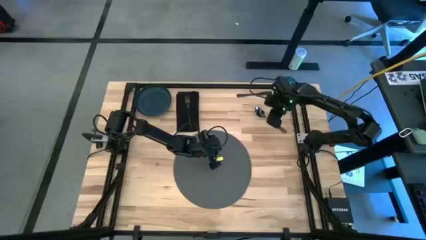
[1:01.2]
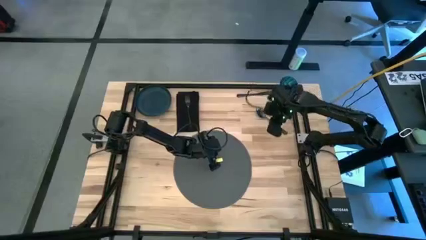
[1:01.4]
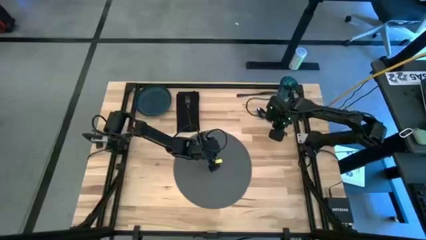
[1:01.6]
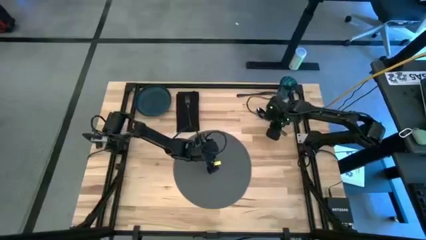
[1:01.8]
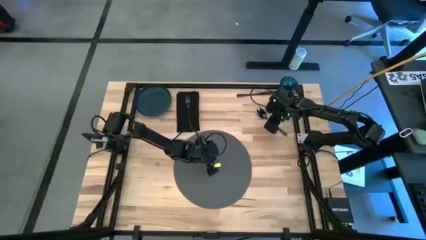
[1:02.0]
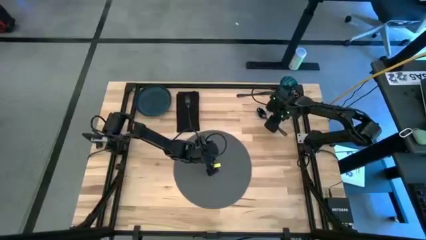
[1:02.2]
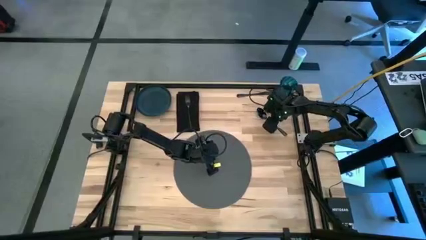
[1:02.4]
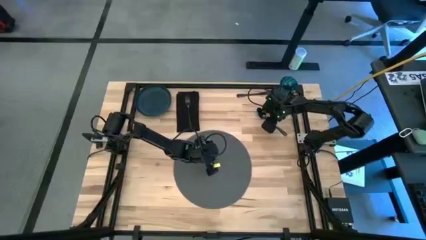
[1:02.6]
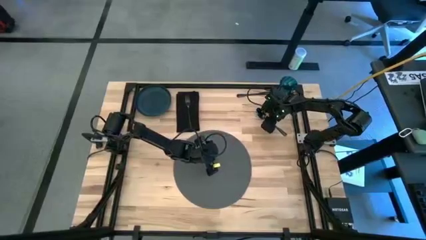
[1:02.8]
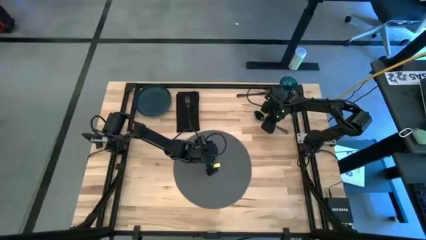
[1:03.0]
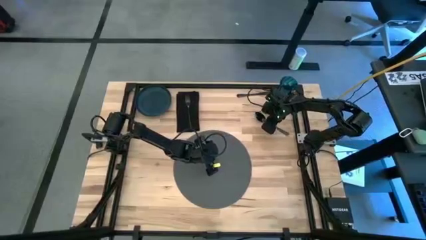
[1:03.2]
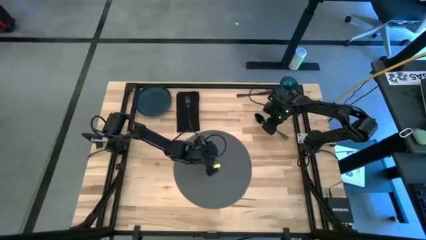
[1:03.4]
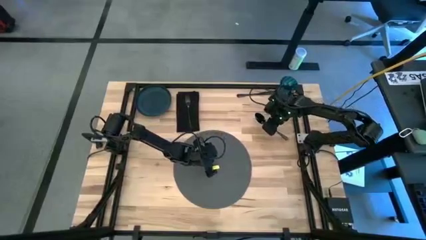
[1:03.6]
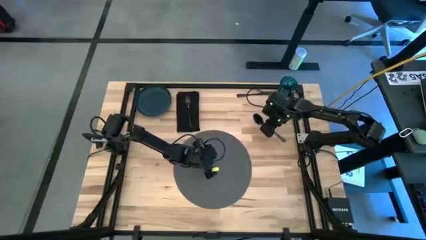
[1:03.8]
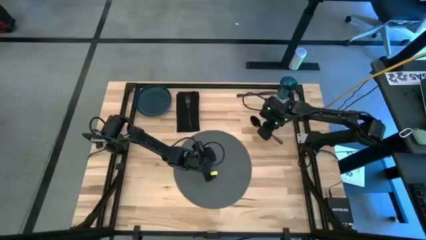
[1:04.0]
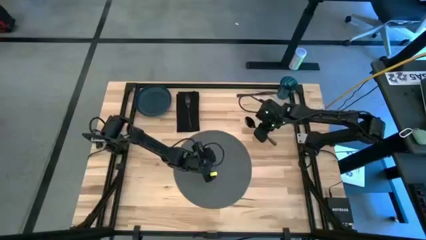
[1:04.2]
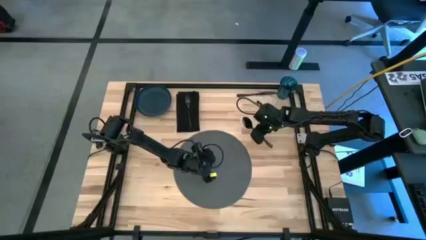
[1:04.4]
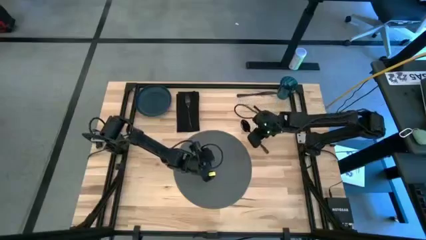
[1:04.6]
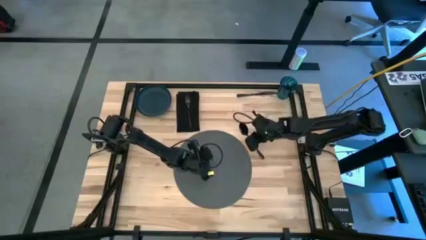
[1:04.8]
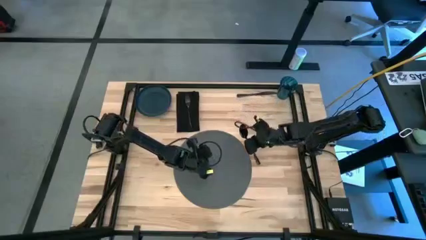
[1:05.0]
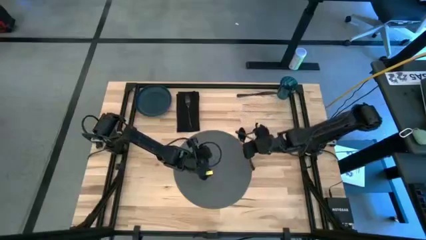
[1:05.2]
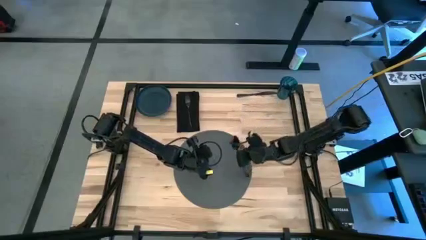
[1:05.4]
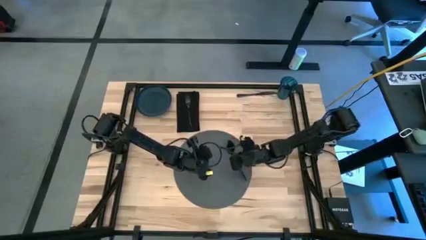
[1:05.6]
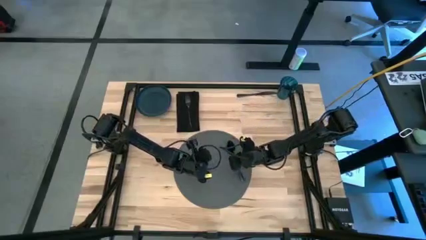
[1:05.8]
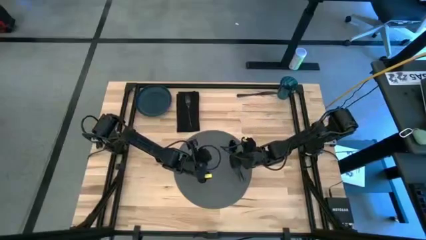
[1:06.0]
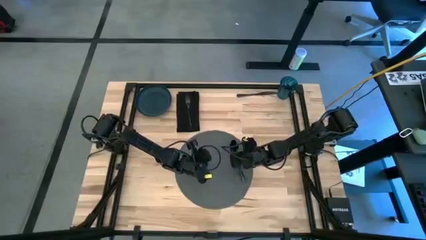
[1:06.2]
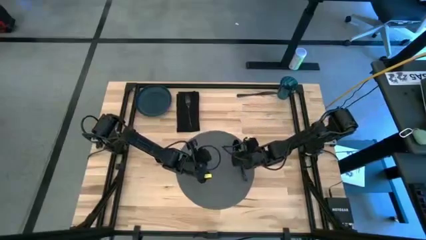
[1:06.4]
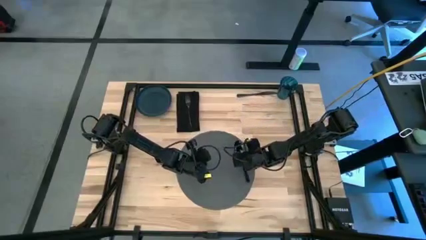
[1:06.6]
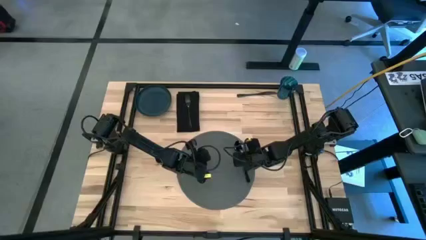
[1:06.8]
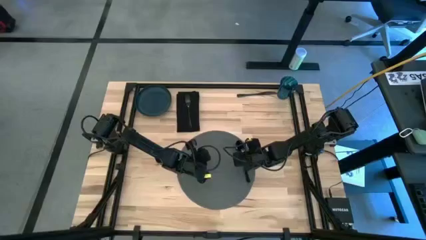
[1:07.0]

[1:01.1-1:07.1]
Task: Set table place
Put the black spoon on the gray tablemat

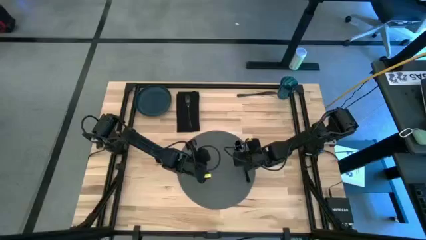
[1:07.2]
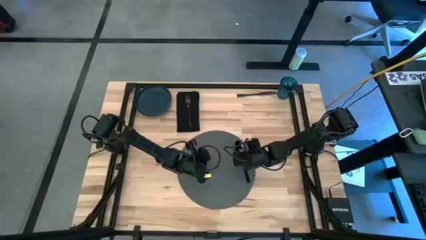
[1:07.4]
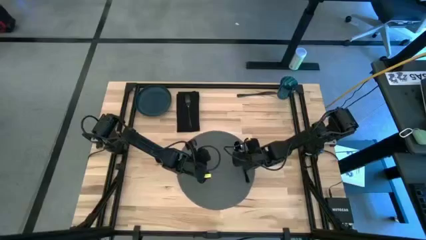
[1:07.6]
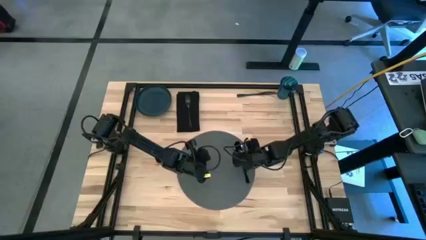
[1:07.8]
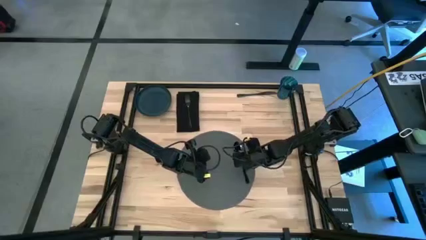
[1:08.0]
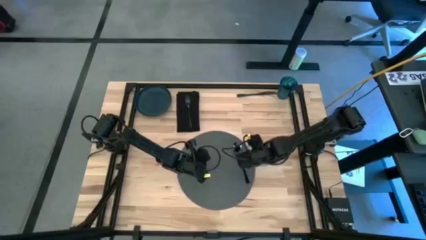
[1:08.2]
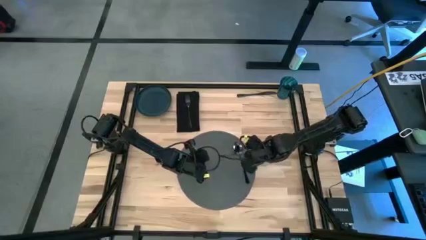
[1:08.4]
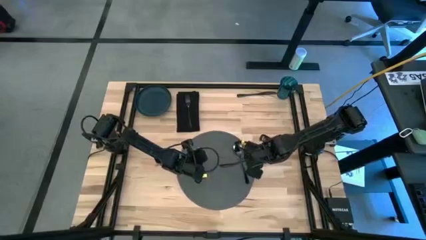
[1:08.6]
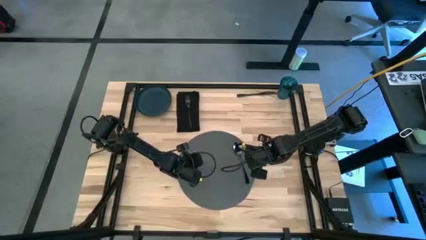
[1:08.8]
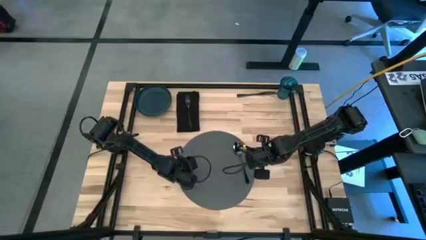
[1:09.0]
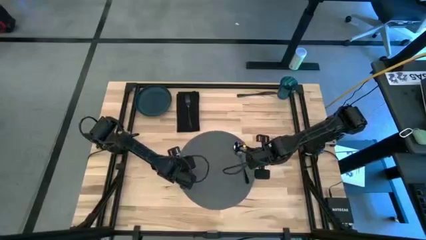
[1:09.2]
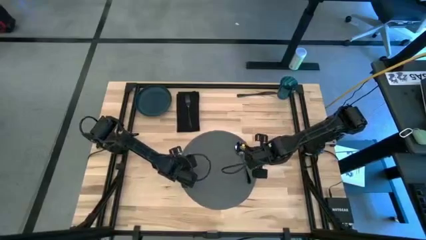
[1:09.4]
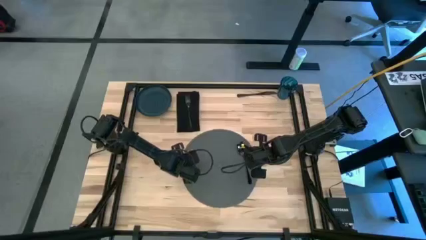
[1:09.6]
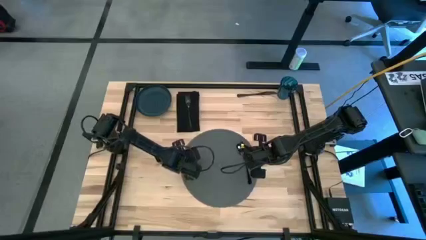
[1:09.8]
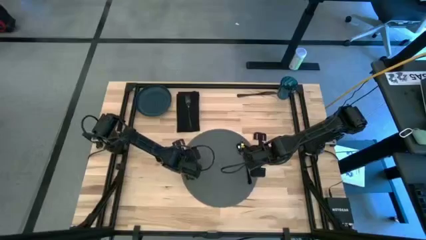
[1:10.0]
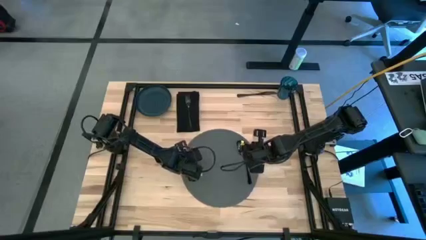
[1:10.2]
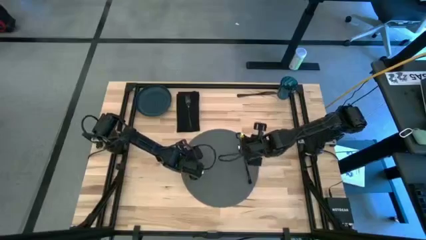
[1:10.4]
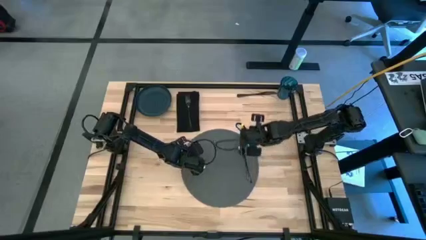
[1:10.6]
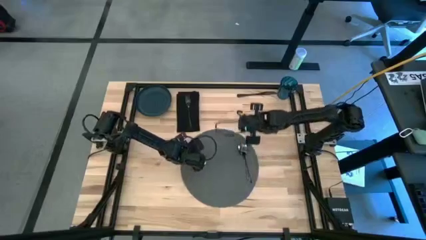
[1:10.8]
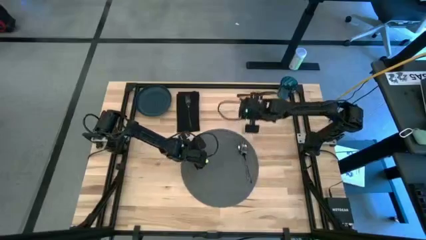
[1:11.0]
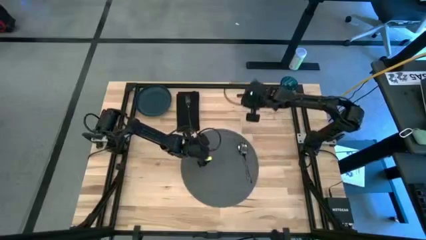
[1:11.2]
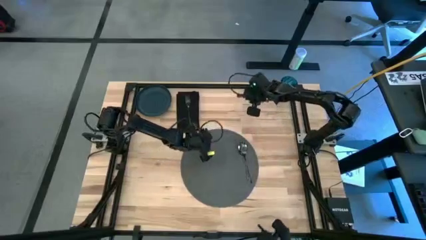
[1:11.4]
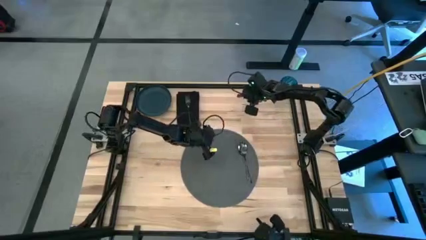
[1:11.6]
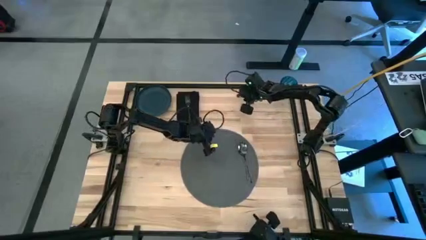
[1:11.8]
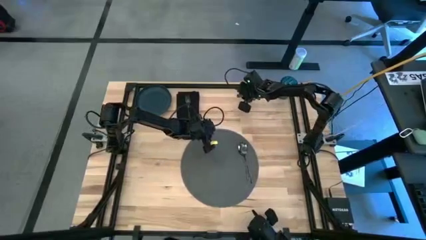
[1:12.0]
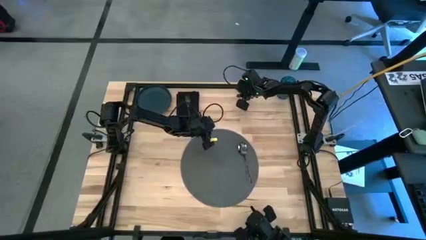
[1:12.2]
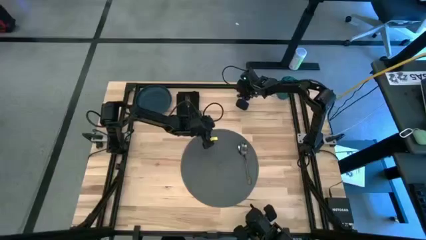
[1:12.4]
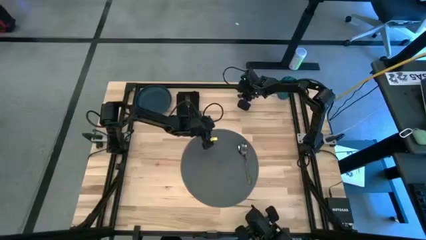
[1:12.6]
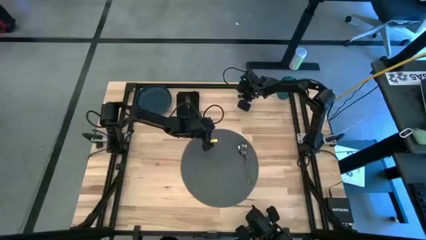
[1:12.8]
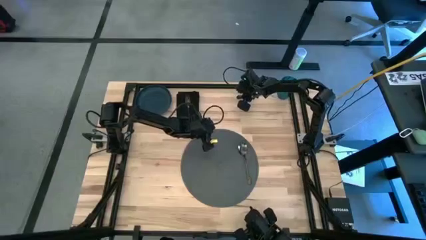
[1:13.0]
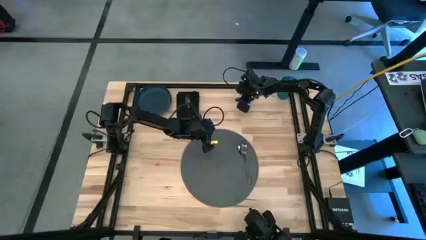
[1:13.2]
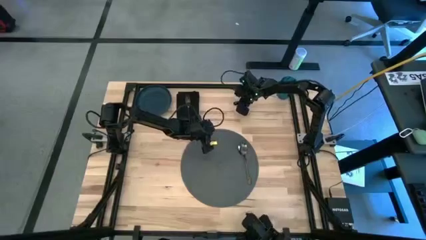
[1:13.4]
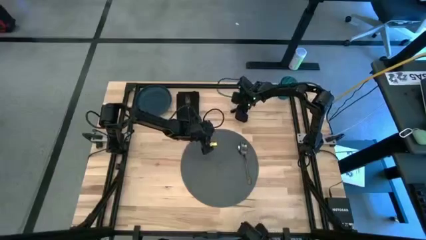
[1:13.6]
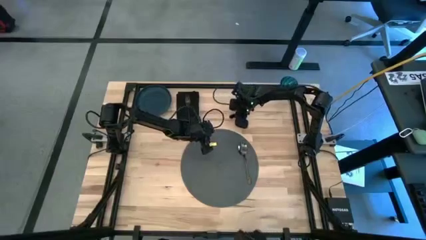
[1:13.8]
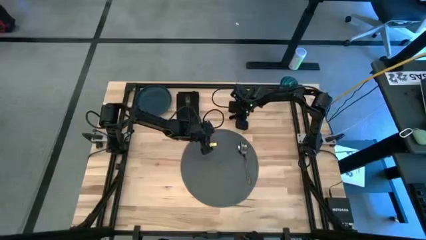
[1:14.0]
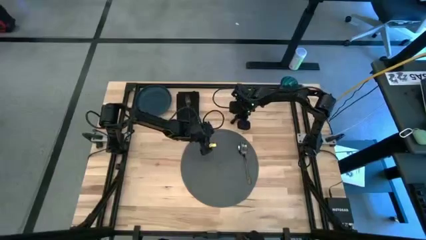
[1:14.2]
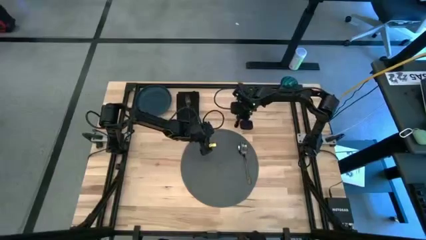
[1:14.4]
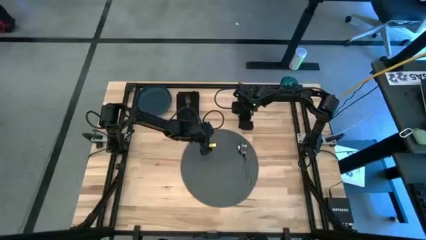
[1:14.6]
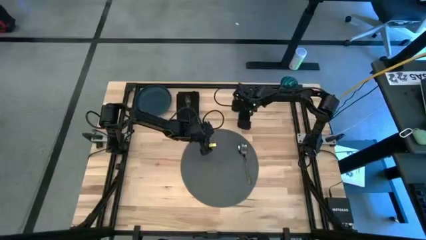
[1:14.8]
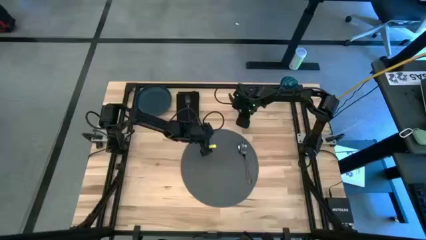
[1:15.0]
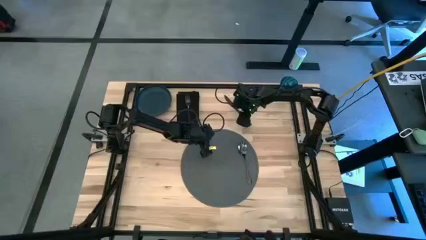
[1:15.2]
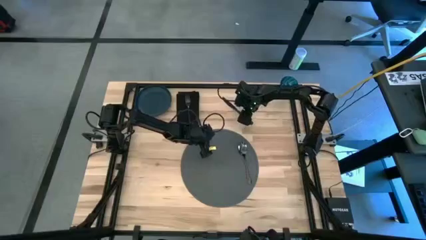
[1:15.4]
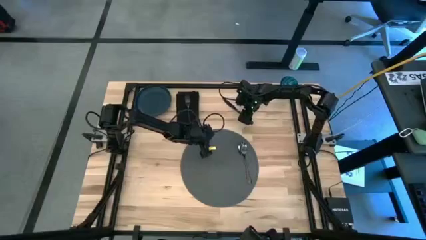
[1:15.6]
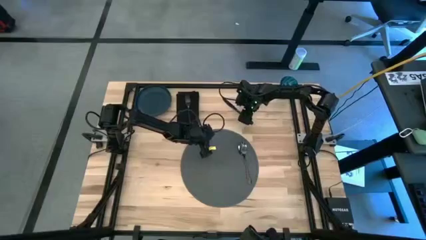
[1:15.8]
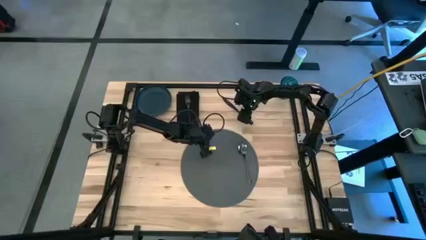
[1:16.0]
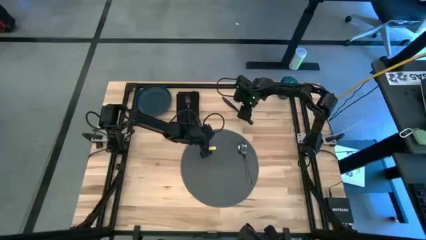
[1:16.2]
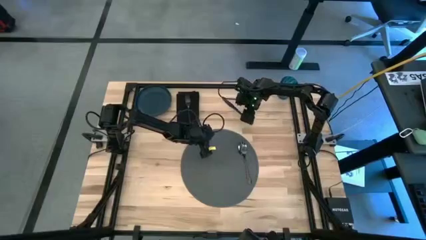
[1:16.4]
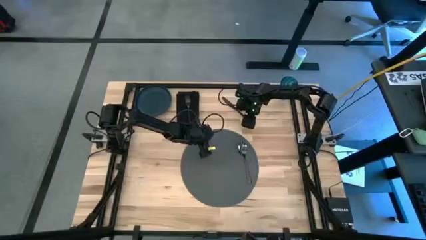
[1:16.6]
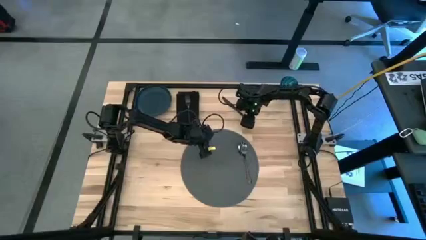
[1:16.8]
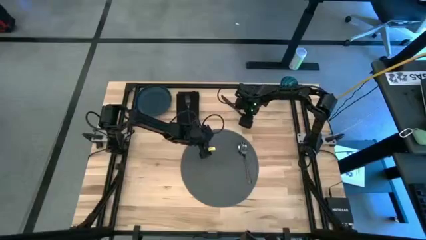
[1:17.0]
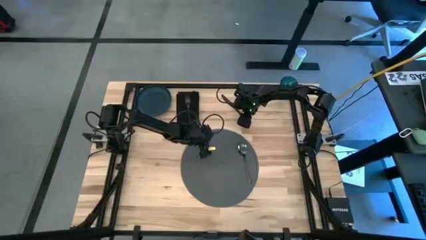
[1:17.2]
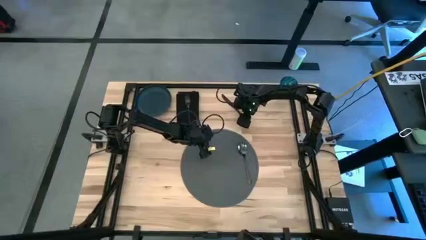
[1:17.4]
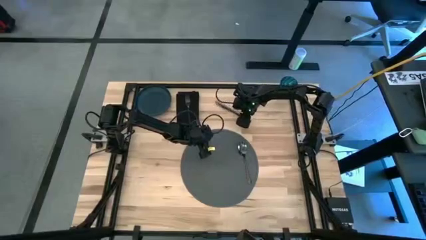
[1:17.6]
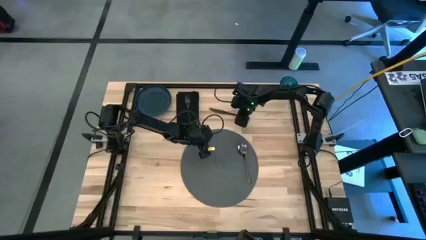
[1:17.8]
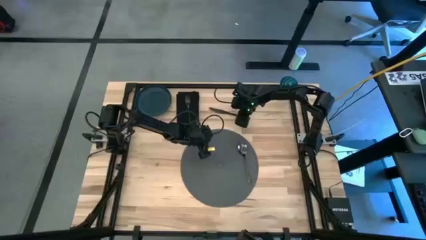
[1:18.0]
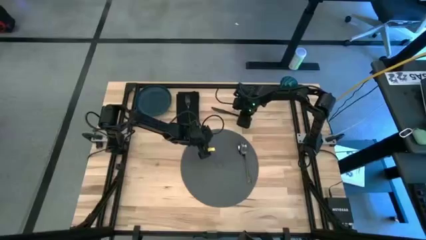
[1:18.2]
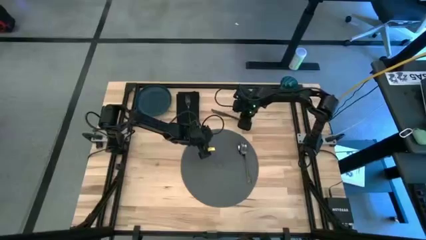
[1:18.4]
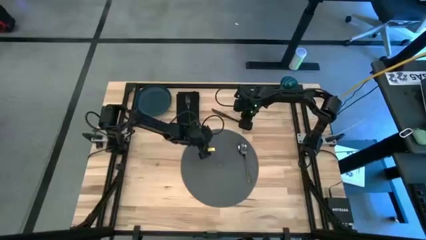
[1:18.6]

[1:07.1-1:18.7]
Put the black table knife on the gray tablemat to the left of the black spoon
